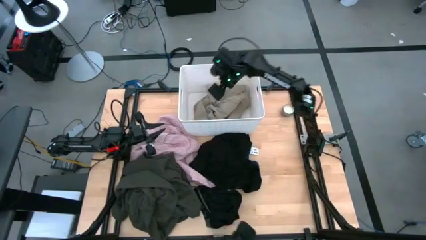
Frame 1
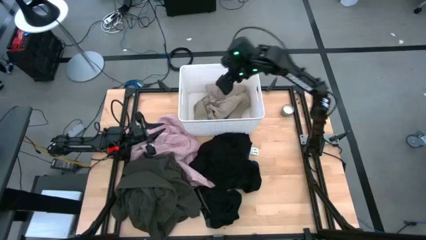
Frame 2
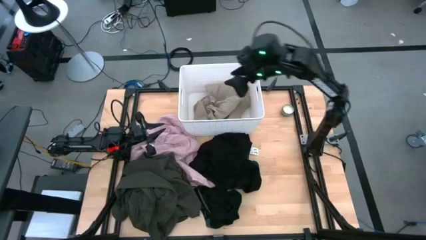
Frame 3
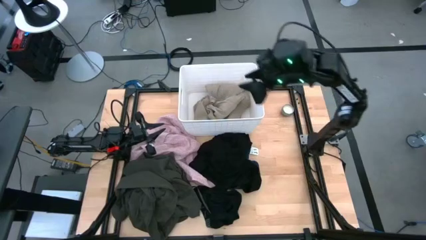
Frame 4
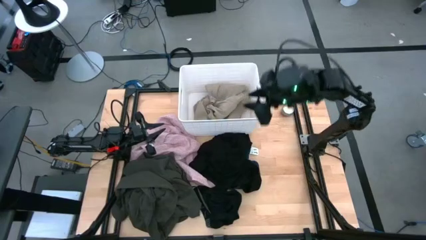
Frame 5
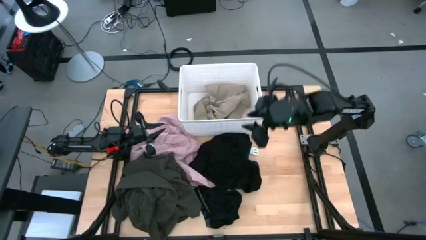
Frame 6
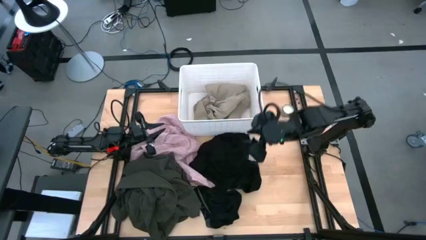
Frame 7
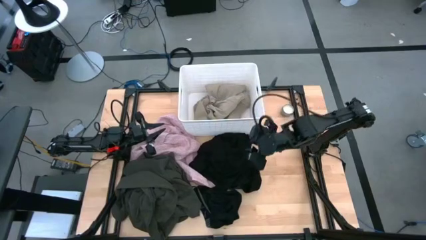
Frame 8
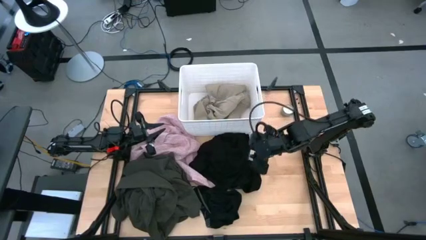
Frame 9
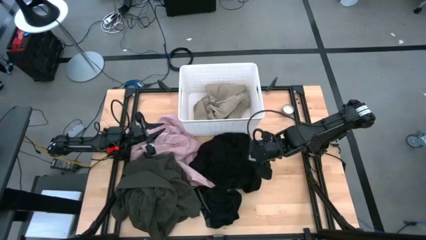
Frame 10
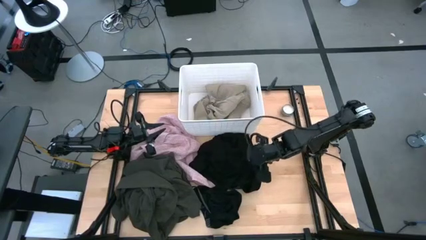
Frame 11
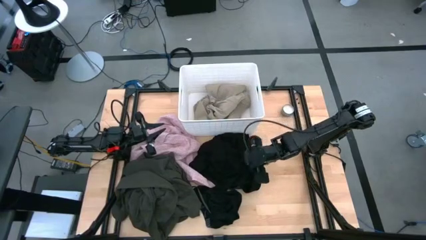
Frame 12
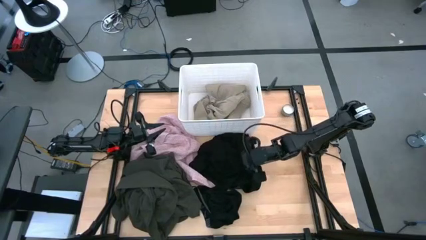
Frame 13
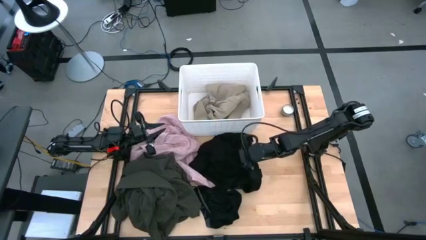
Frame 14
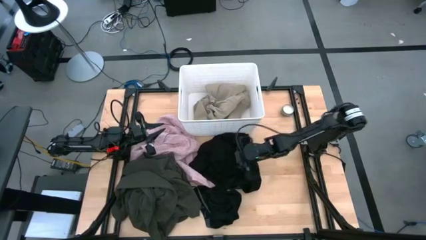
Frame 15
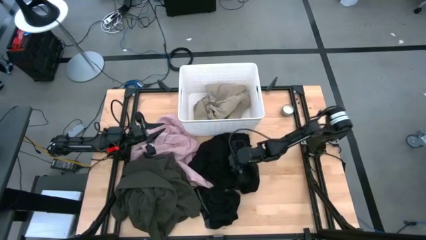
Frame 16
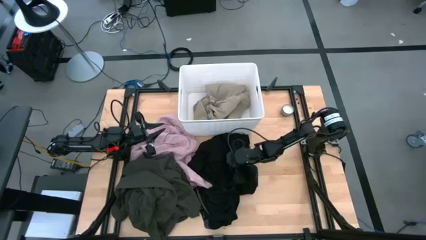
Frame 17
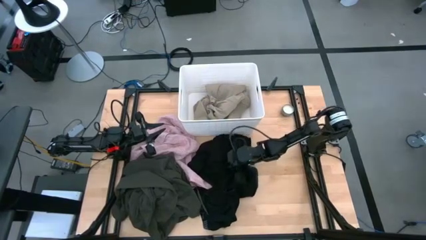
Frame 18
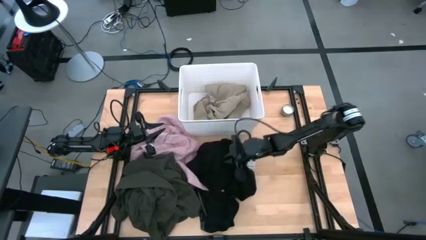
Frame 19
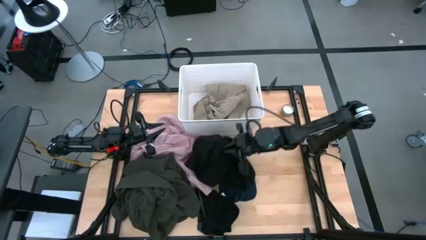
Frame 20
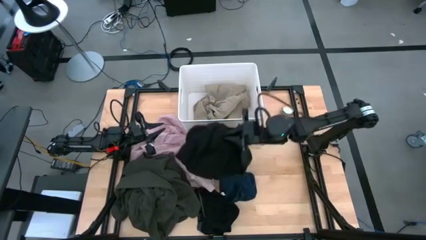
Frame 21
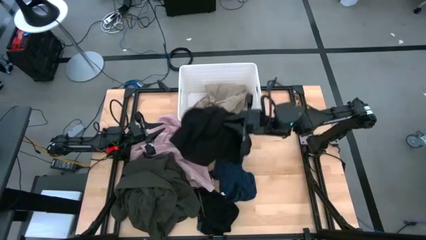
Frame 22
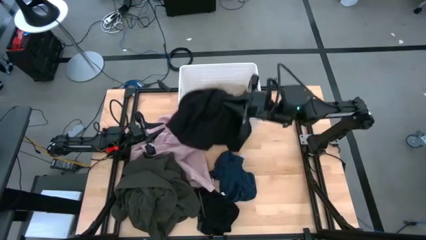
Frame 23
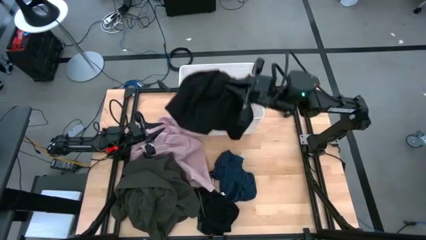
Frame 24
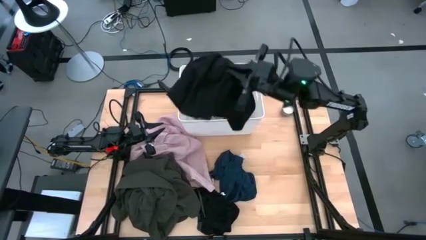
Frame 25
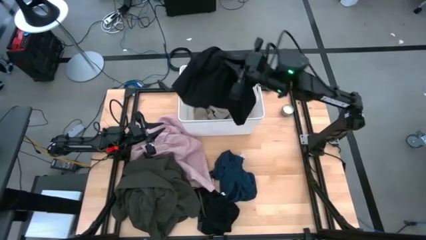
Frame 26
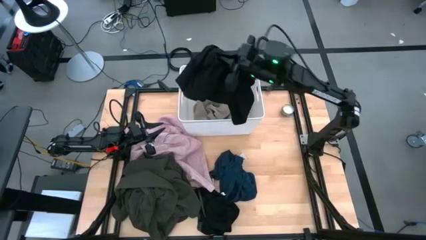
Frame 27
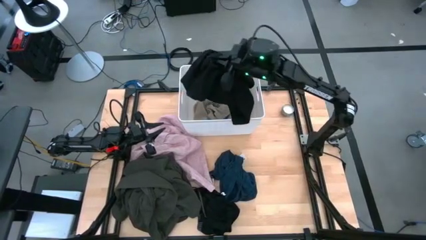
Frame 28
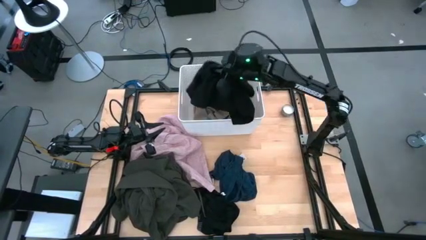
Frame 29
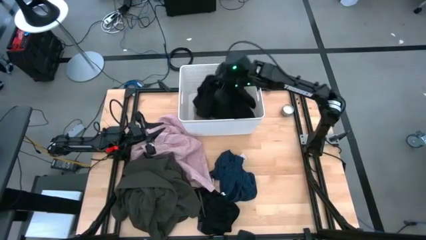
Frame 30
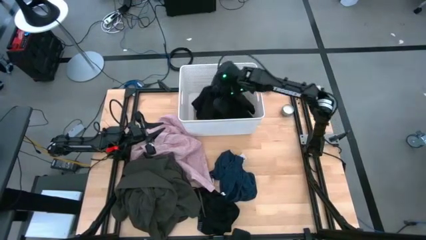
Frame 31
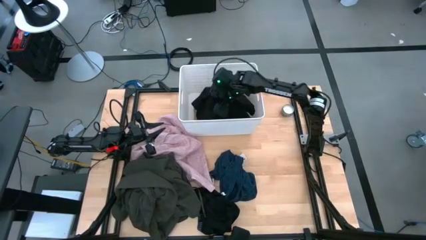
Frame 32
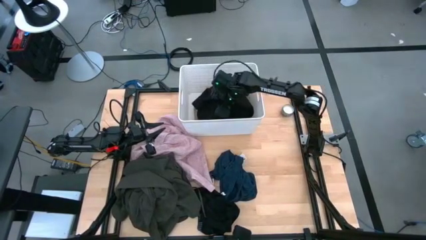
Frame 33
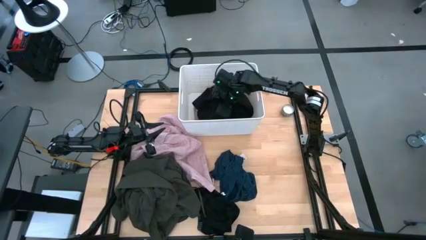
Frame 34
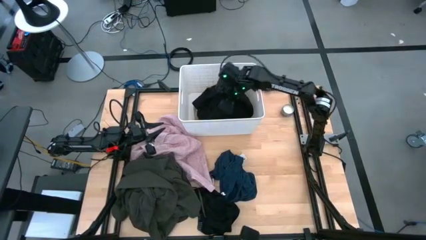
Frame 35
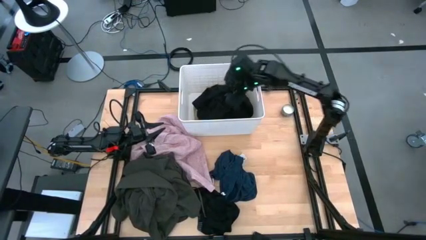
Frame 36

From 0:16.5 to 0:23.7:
Task: Sort clothes
Put the black shirt into the white bin

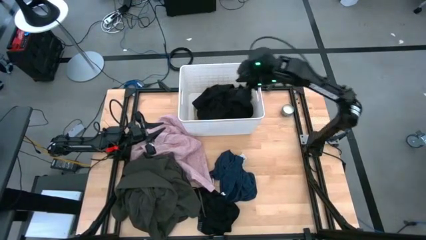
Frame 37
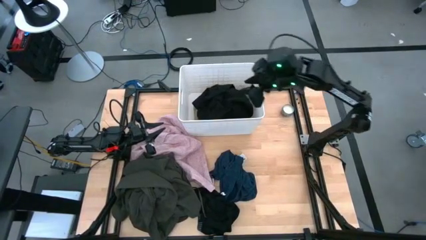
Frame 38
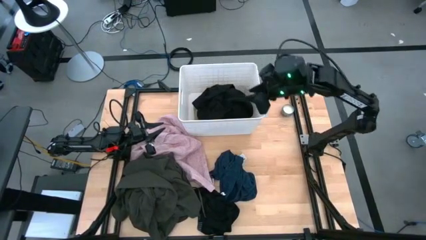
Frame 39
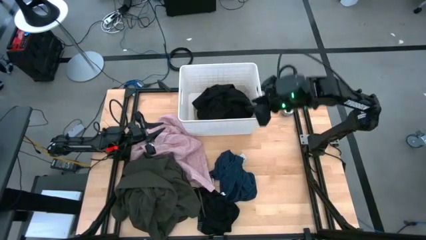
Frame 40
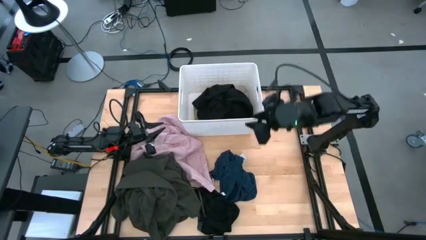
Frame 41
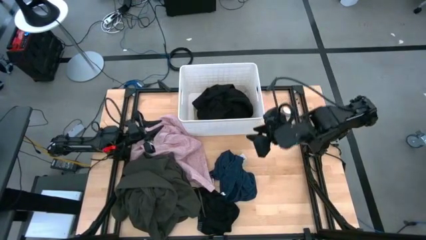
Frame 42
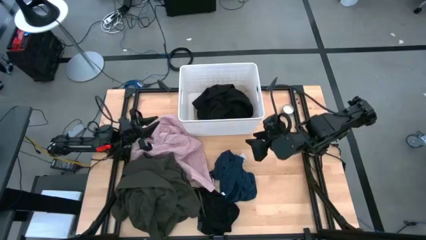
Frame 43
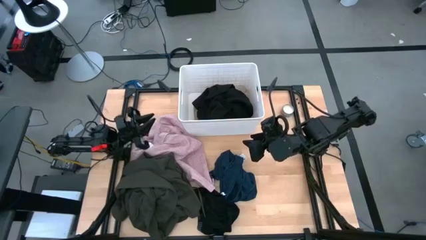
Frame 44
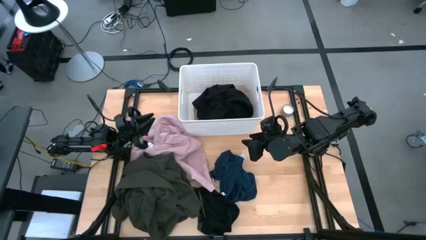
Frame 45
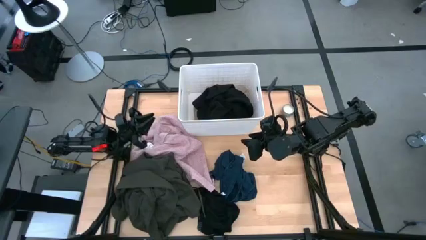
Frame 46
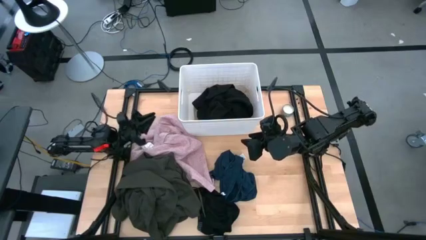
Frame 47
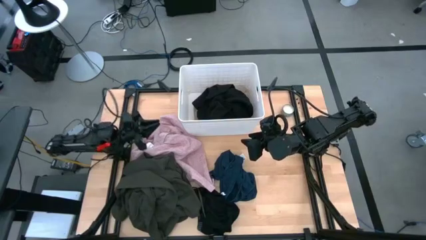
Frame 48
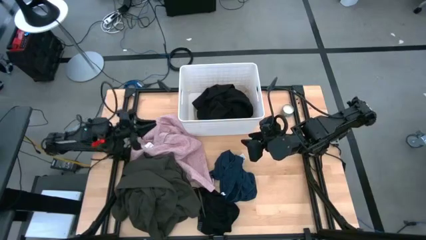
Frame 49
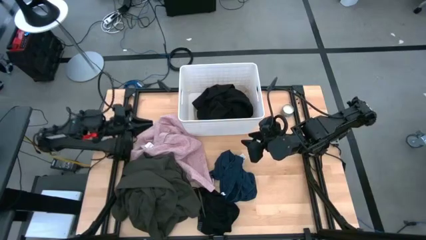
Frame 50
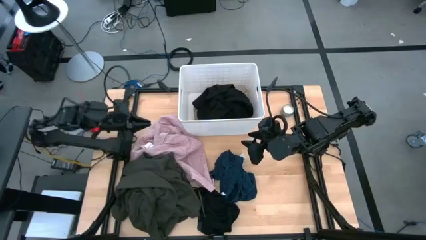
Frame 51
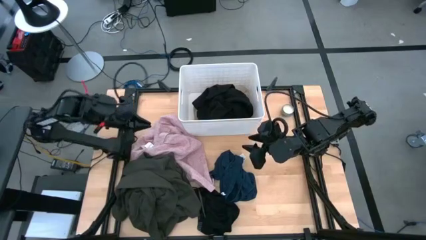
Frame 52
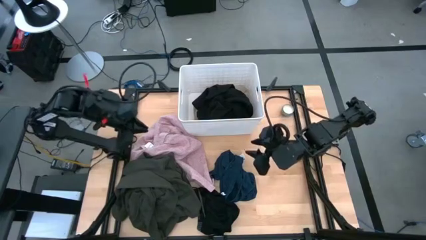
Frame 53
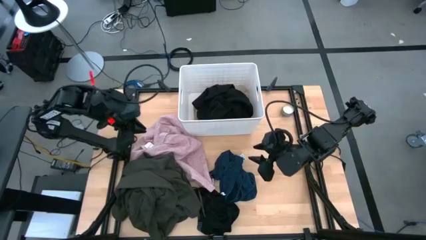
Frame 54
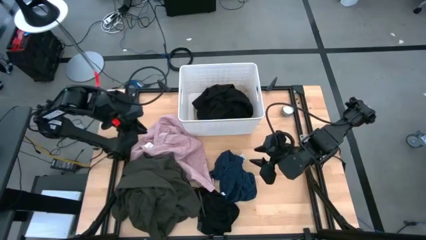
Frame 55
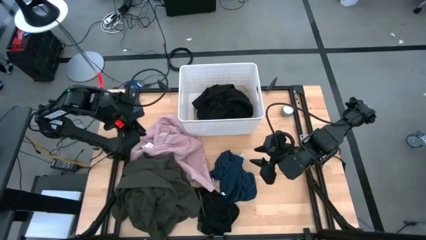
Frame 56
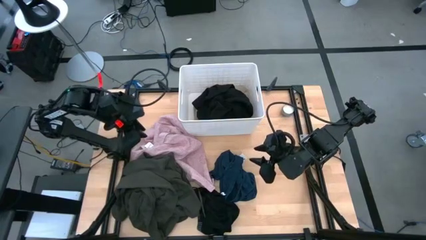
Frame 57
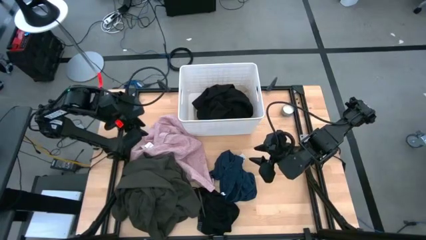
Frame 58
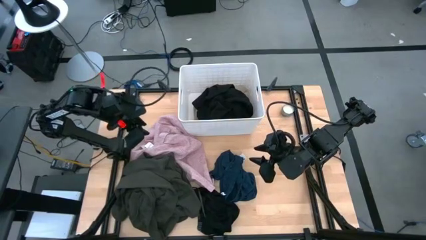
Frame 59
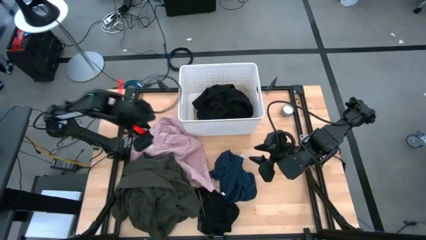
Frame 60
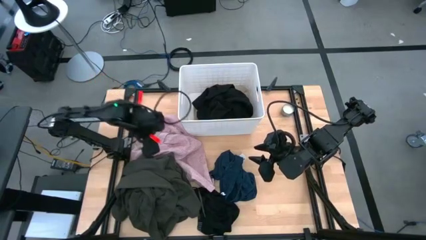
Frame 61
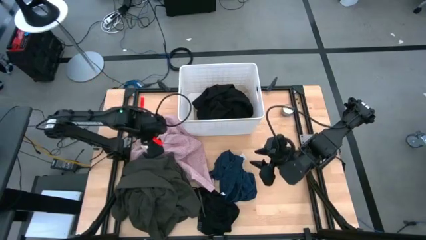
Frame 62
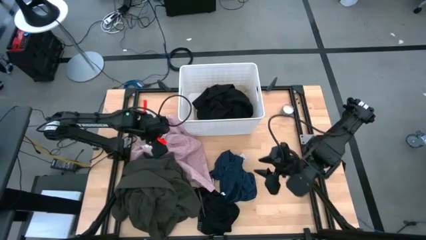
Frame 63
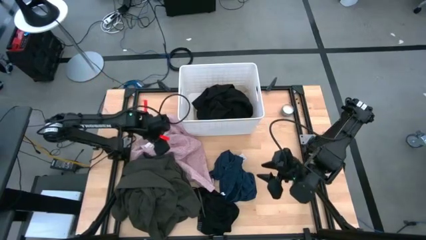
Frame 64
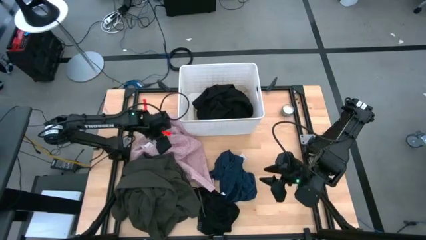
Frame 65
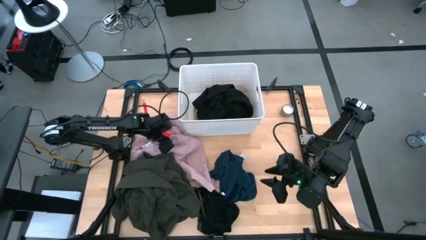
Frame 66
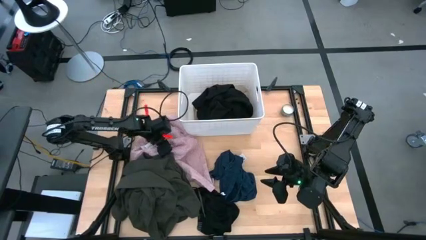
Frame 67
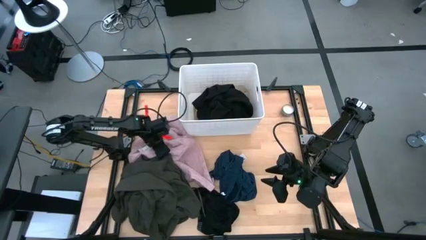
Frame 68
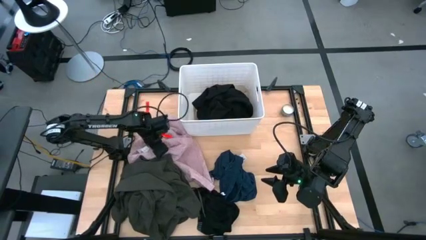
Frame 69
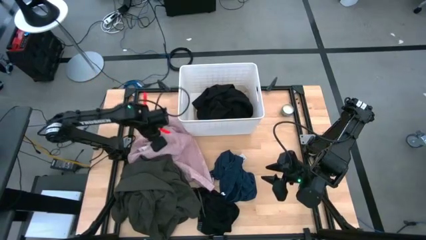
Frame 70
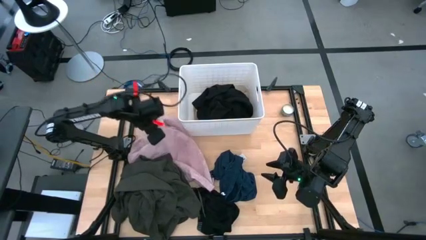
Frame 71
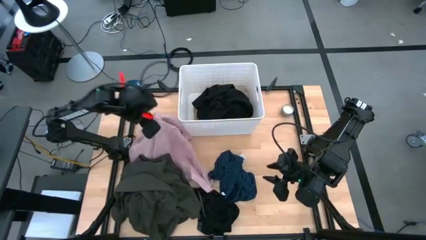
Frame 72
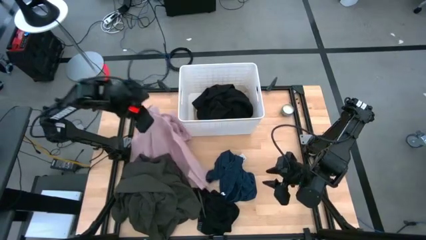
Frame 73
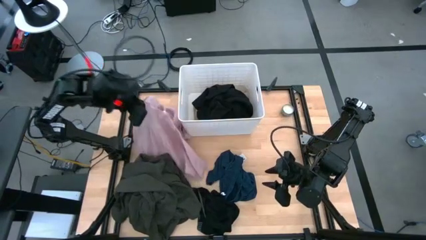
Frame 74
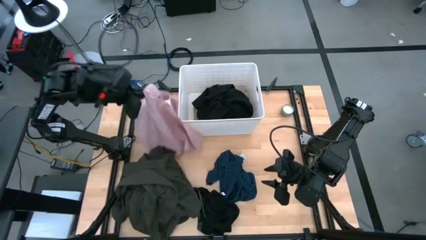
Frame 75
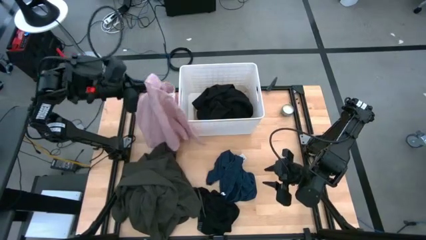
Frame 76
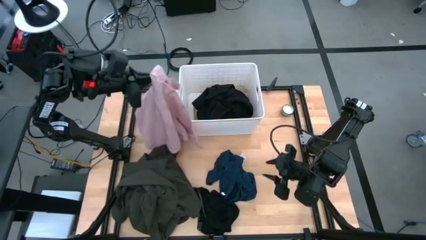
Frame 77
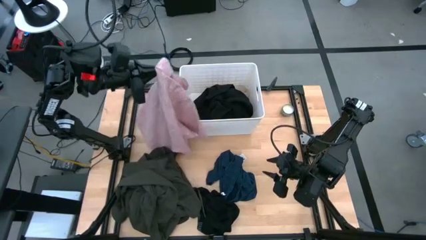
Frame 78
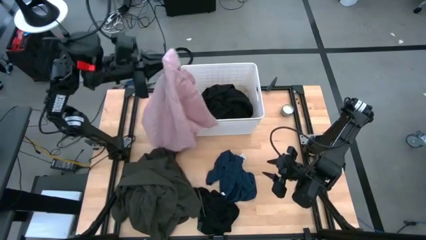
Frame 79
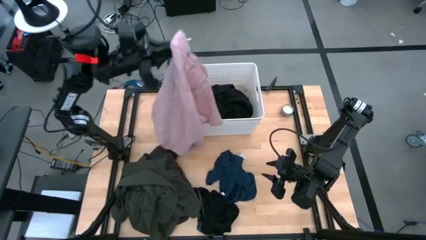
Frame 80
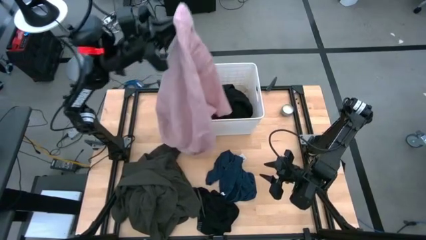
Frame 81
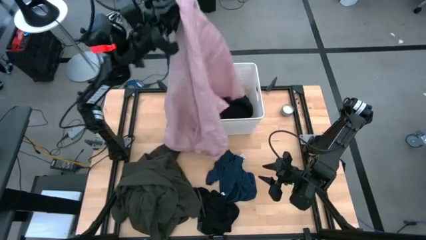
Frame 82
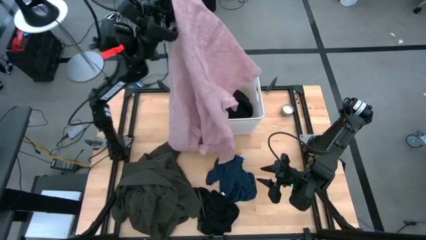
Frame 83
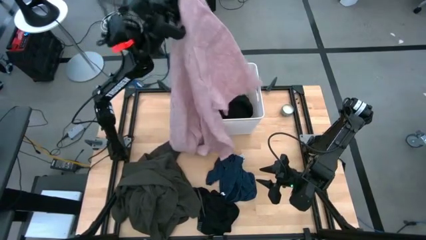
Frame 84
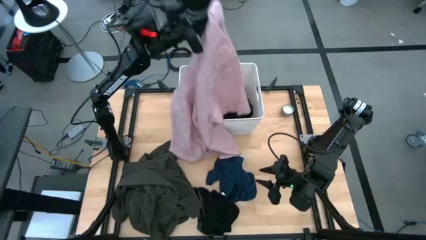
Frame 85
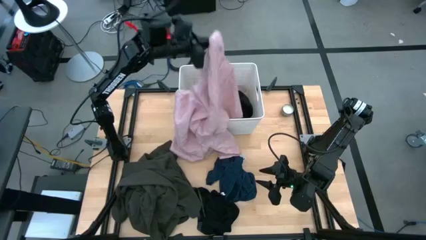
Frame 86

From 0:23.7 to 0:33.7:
Put the pink shirt into the white bin
